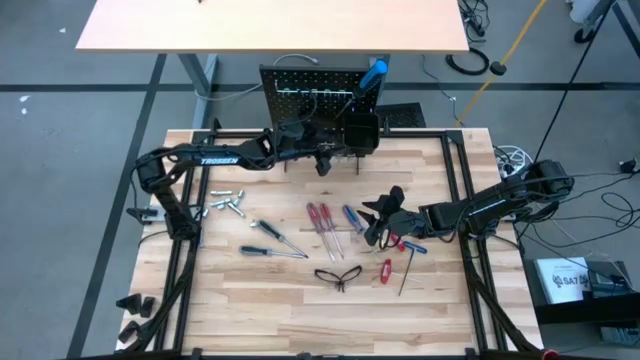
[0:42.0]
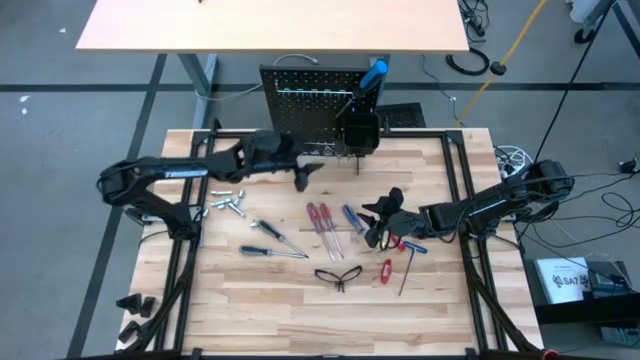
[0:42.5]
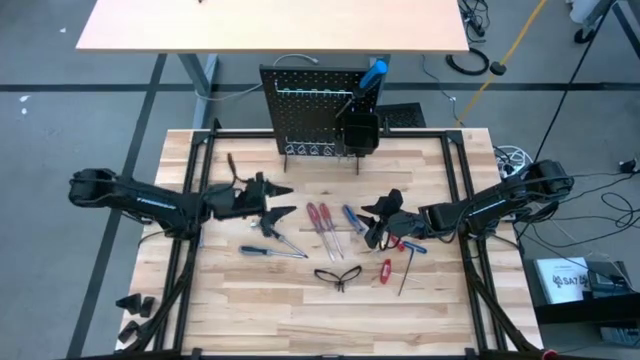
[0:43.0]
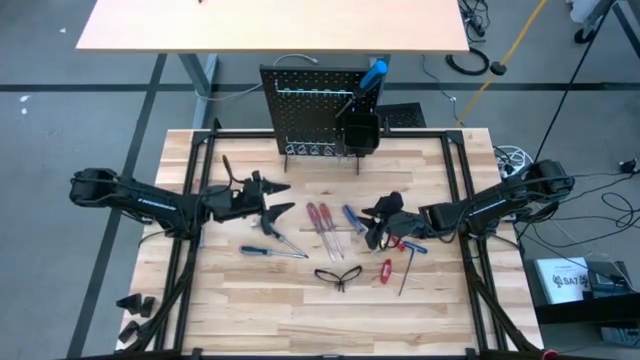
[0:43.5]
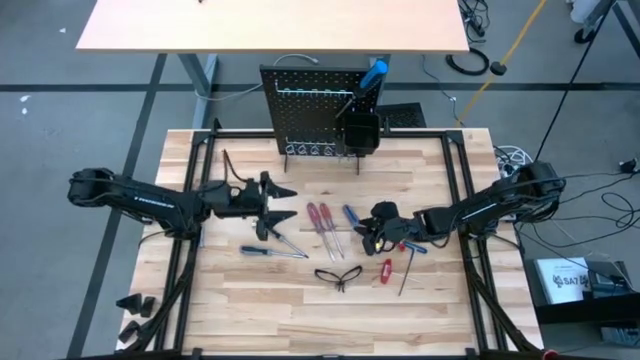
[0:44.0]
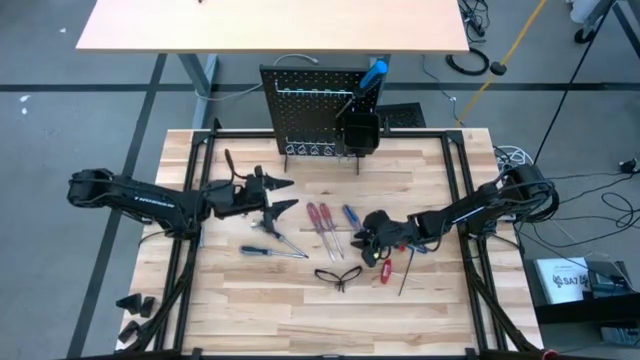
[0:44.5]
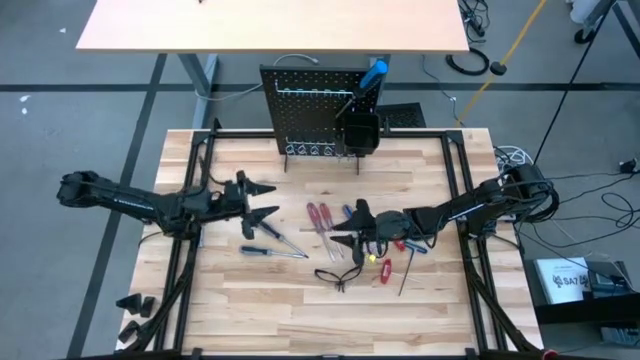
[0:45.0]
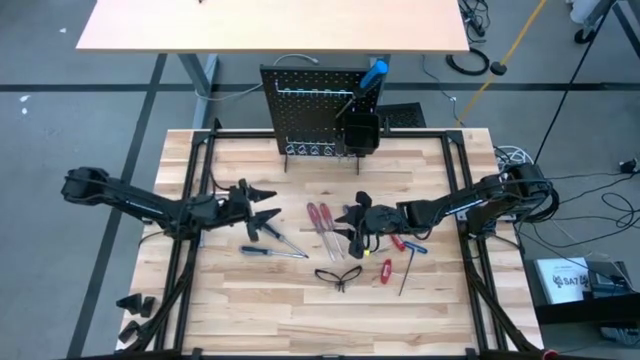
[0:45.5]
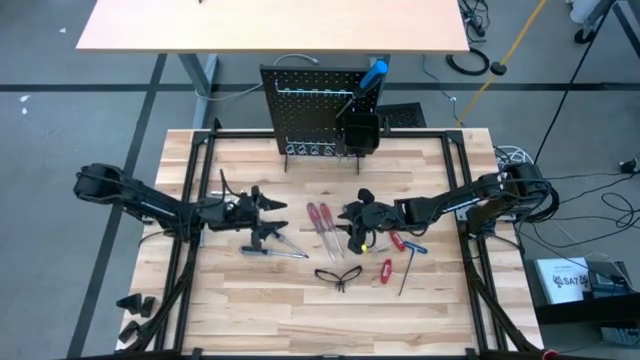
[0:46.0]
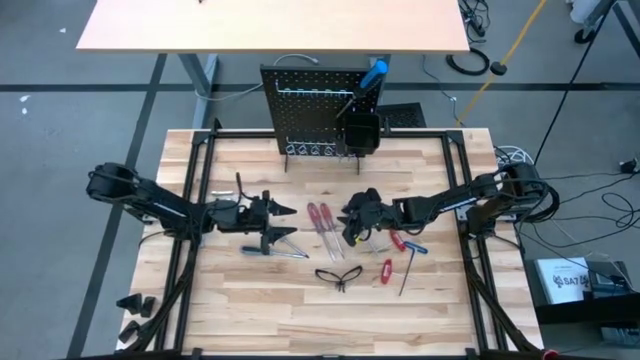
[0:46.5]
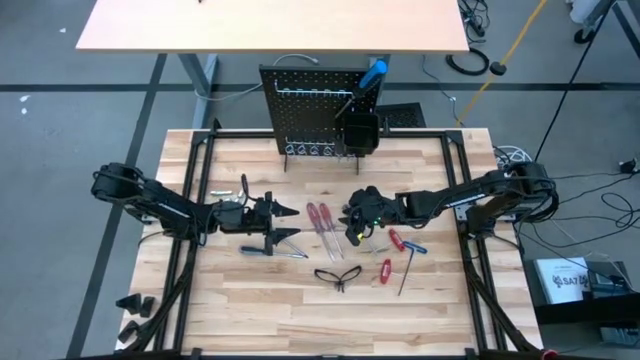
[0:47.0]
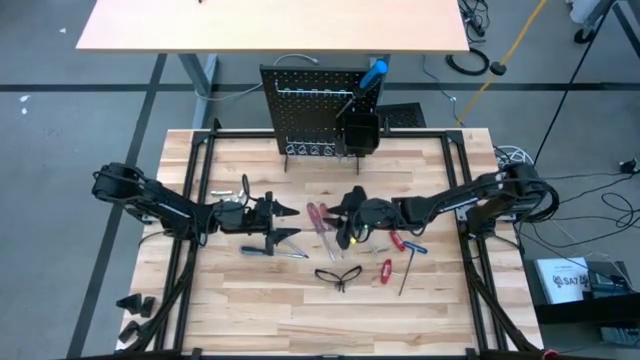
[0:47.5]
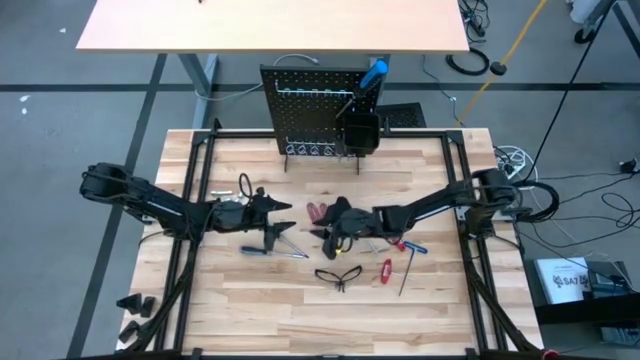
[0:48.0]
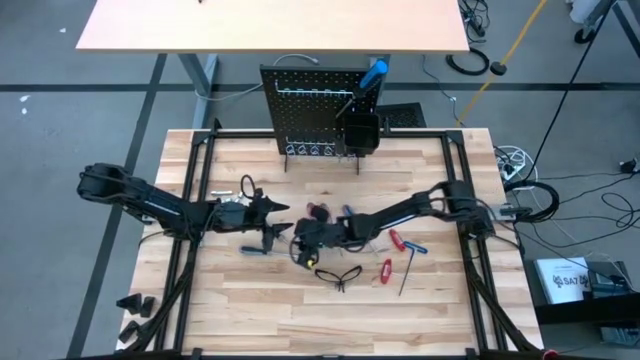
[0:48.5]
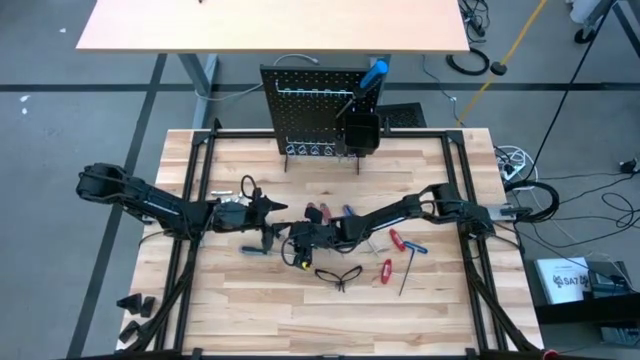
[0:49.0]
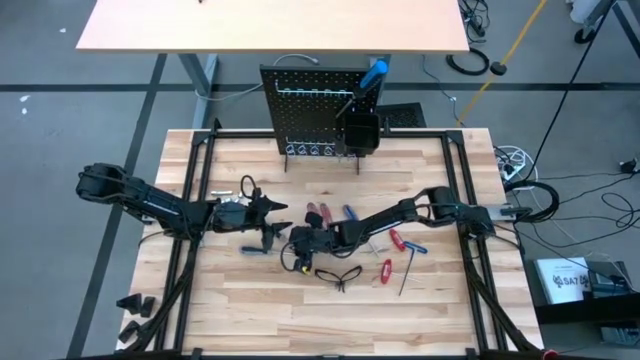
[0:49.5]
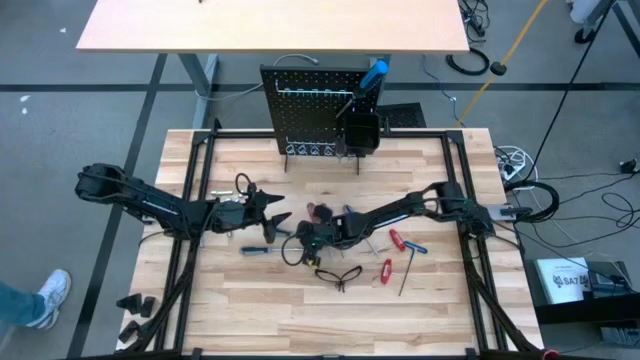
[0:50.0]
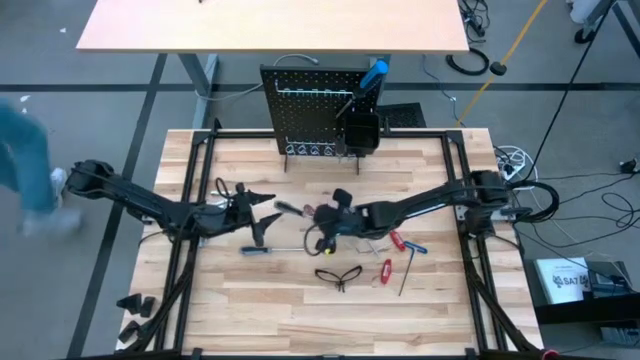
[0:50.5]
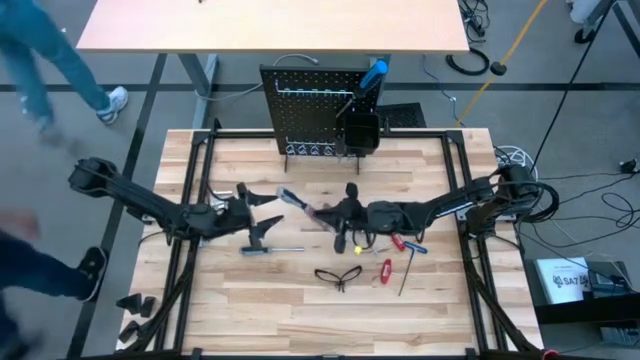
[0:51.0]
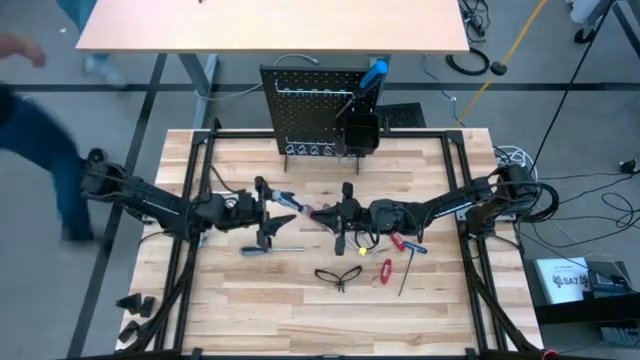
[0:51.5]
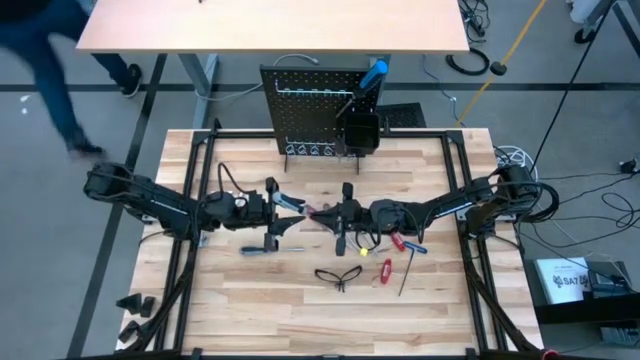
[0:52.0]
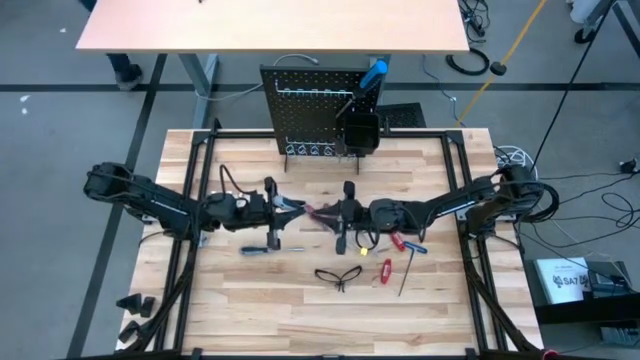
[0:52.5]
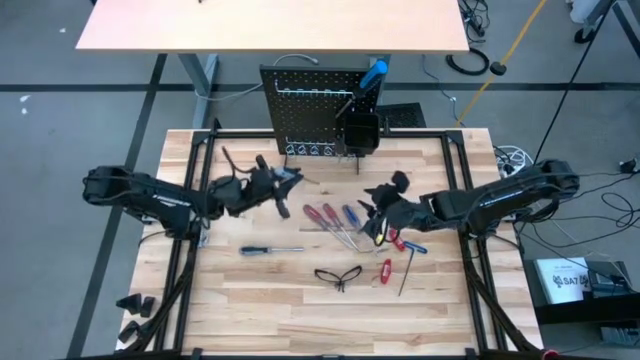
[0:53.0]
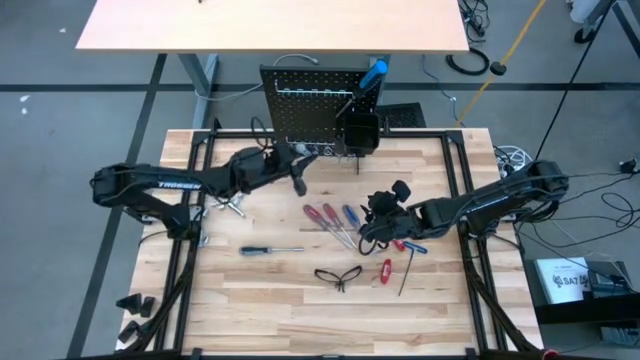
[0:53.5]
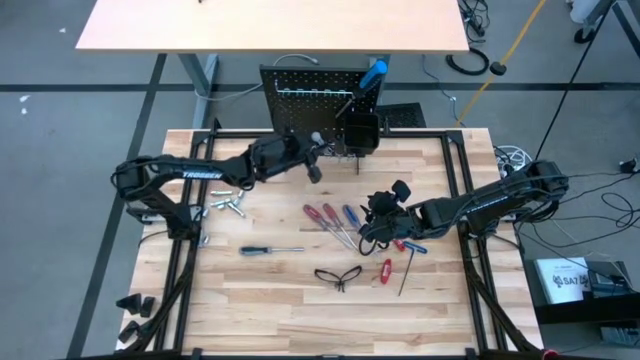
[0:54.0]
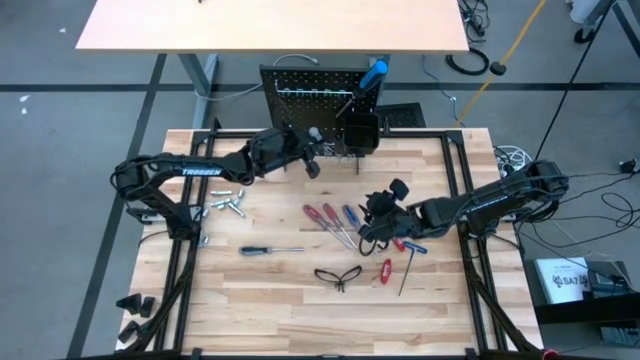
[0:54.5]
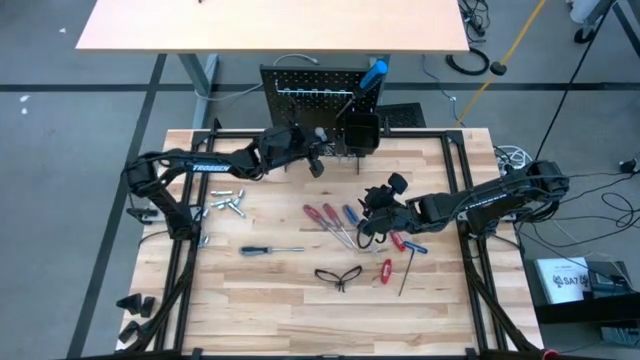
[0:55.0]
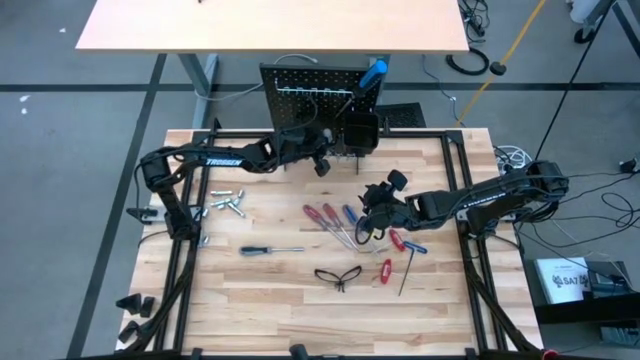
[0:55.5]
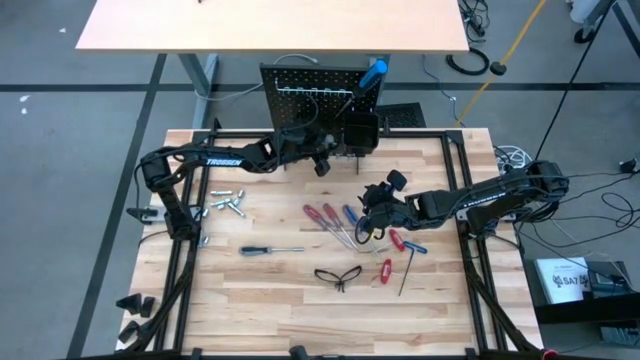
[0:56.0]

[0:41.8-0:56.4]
Task: Hang tools onto peg board
Hang the gray screwdriver onto the peg board

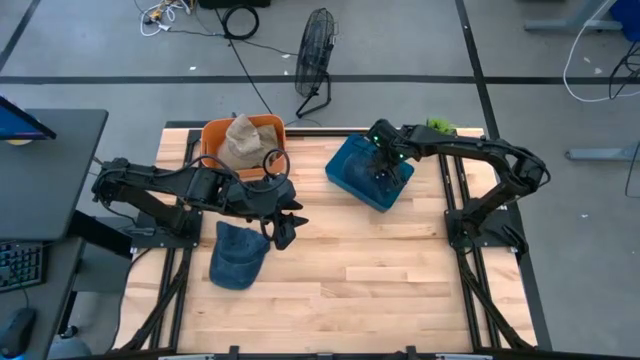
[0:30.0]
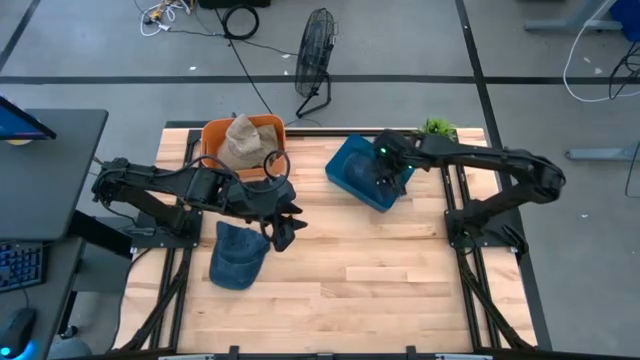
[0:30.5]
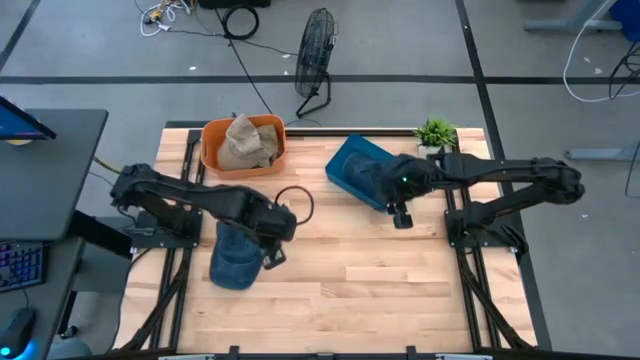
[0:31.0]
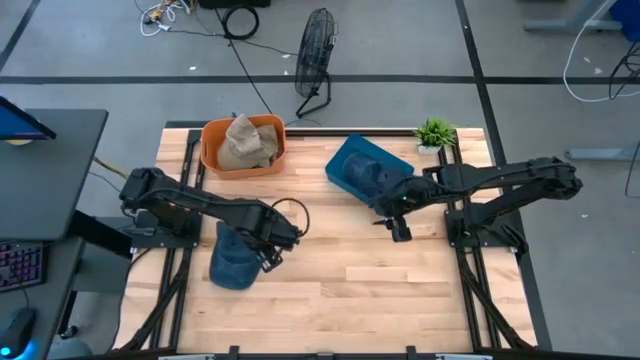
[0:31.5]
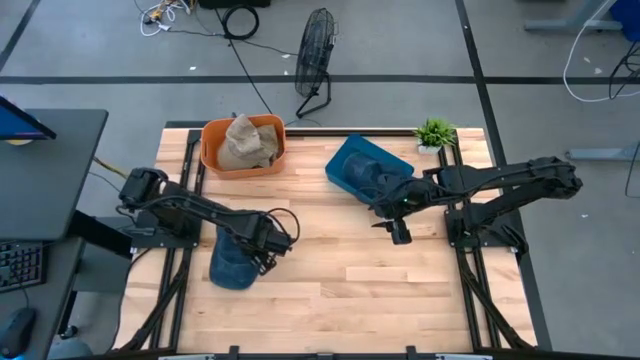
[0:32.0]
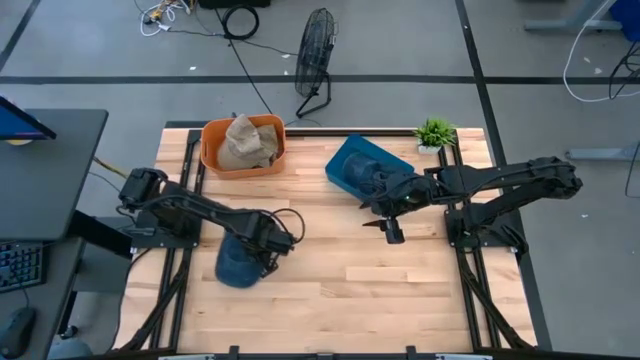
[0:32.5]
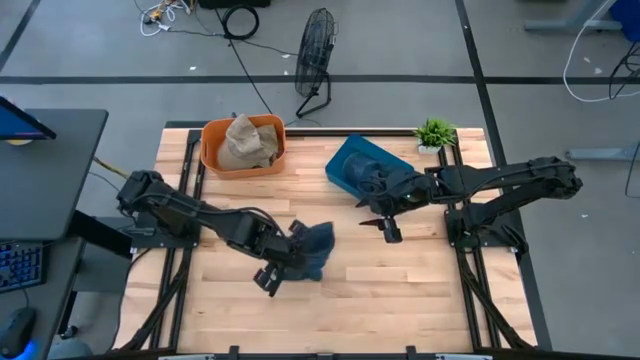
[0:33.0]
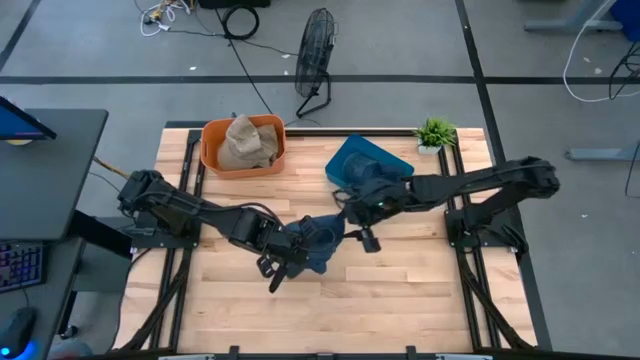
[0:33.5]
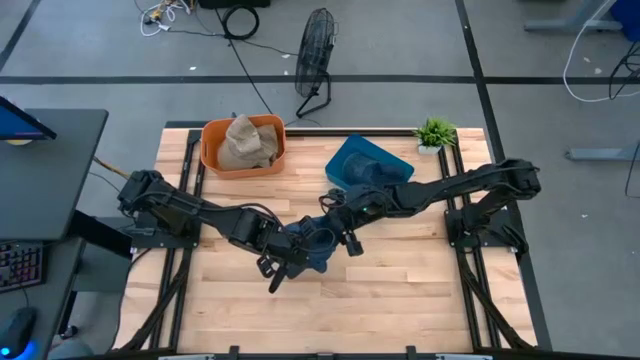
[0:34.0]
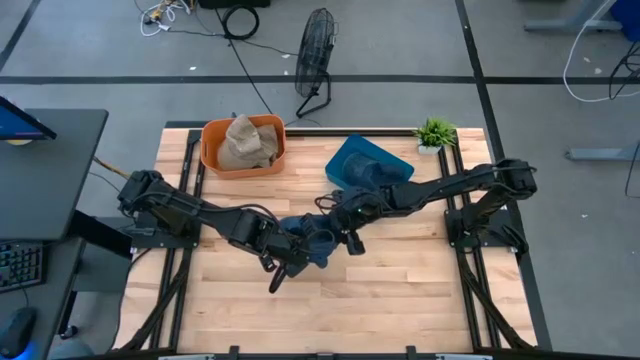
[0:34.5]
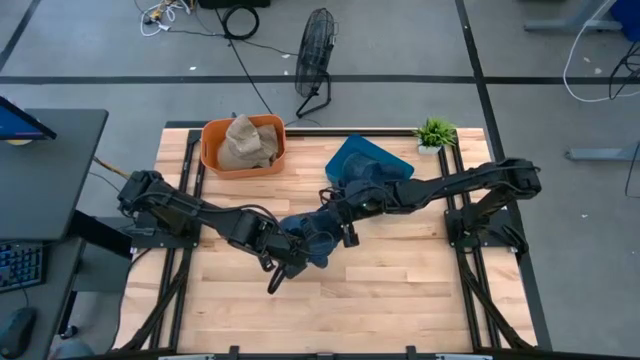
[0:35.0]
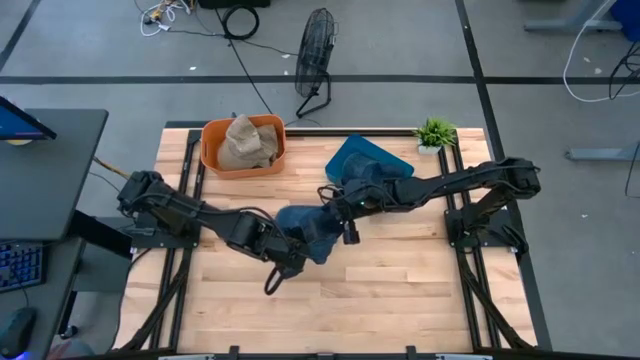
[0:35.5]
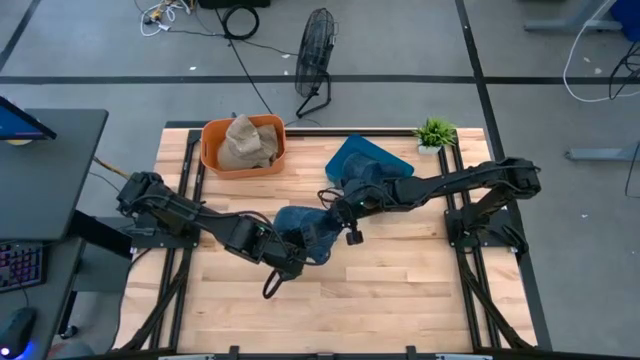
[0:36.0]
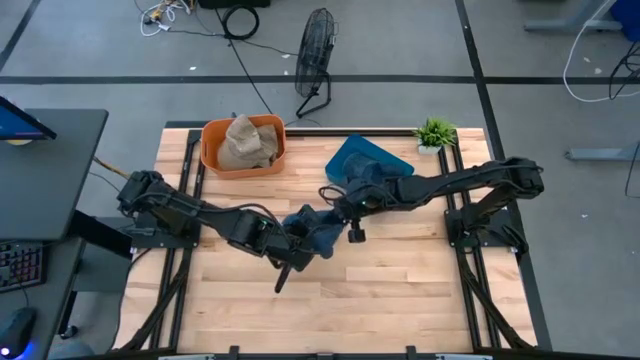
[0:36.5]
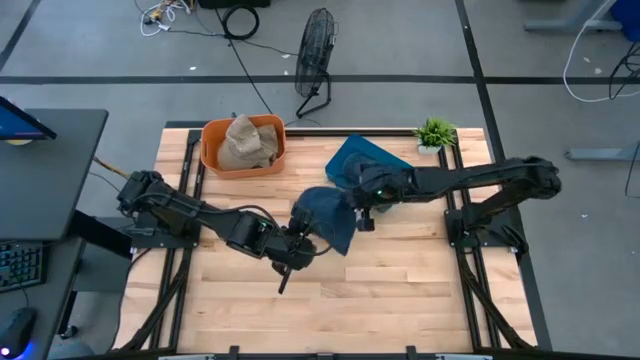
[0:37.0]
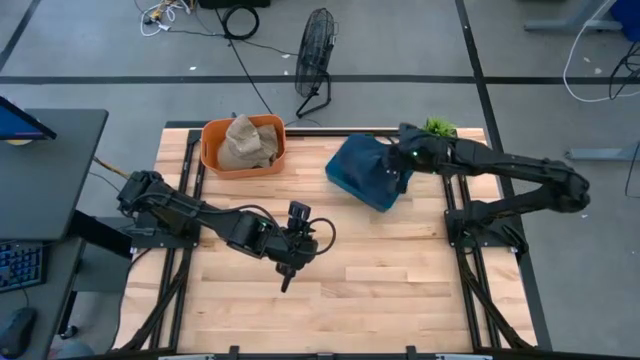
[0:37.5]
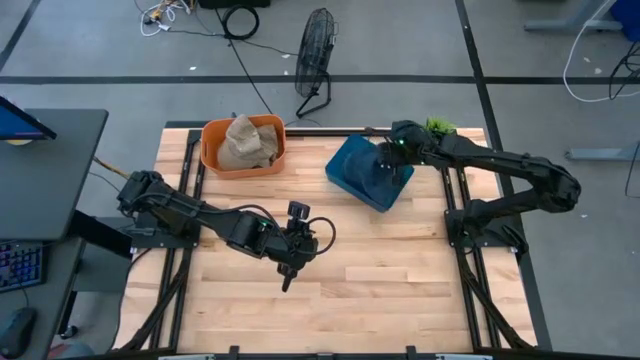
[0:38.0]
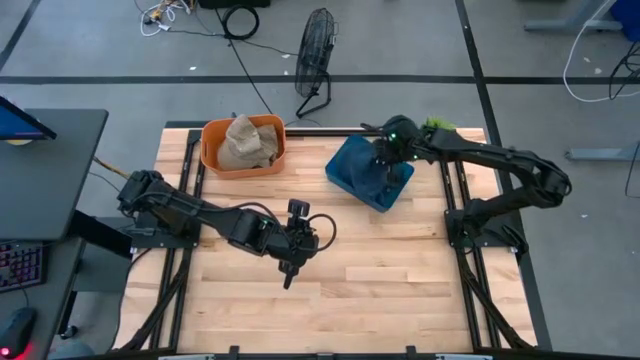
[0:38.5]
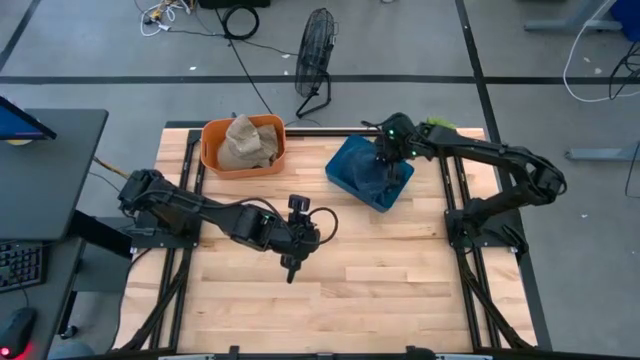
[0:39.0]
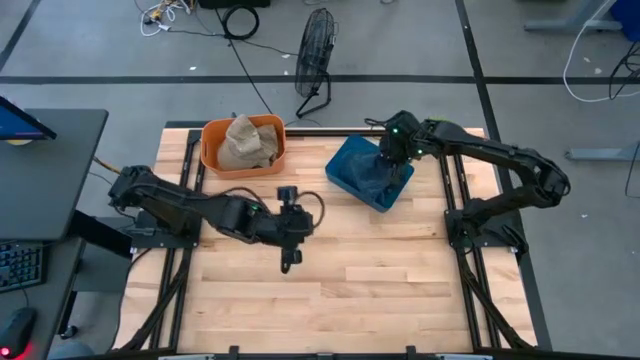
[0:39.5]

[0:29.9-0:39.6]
Task: Pick & Place hat
Put the blue cap into the blue bin
